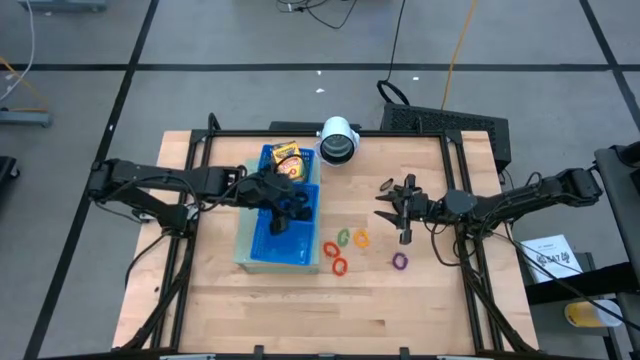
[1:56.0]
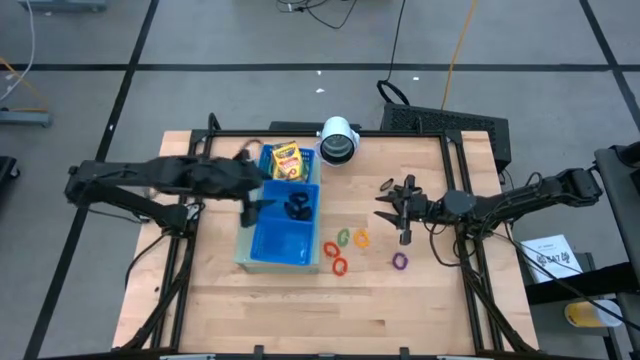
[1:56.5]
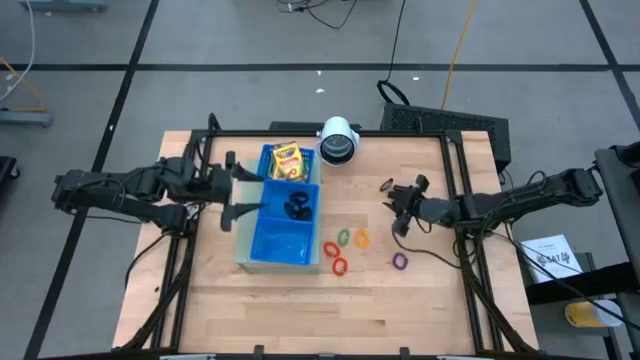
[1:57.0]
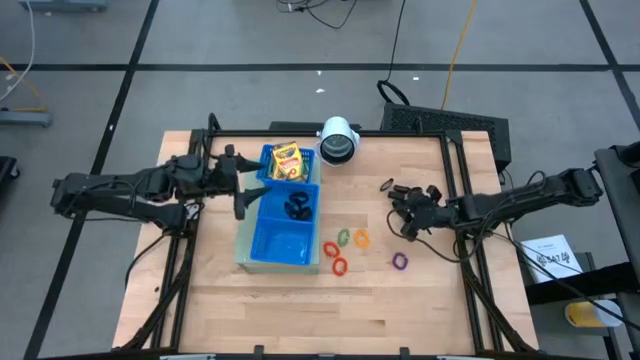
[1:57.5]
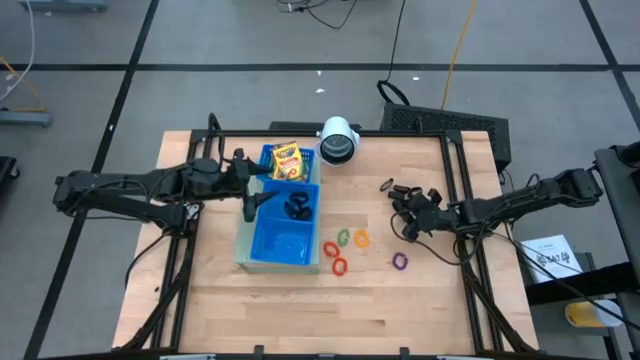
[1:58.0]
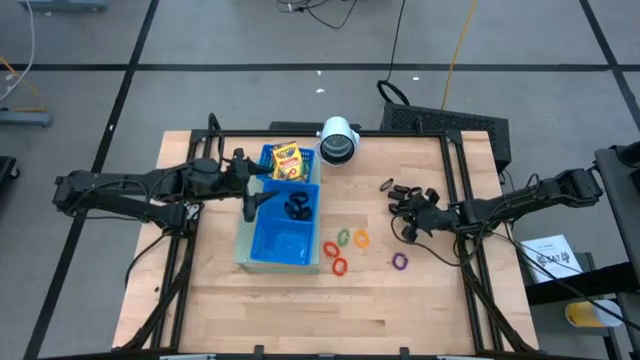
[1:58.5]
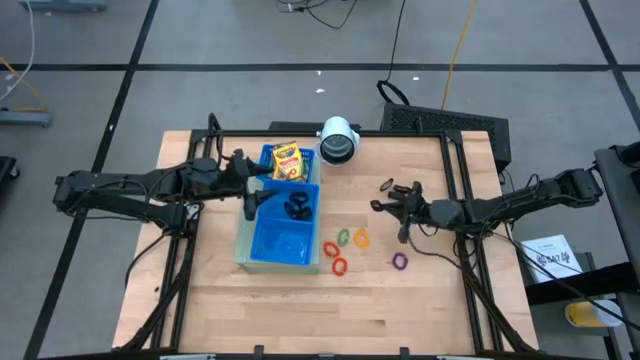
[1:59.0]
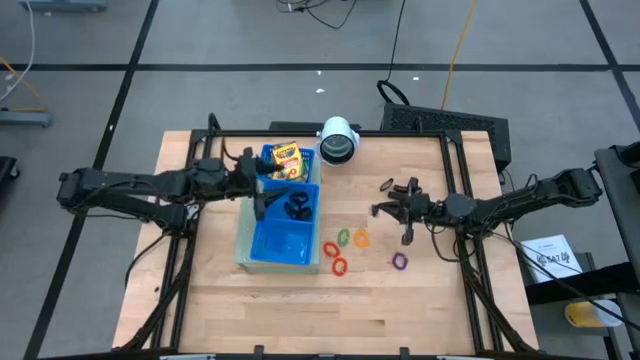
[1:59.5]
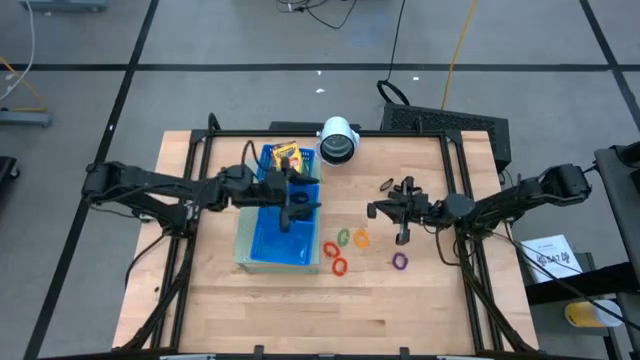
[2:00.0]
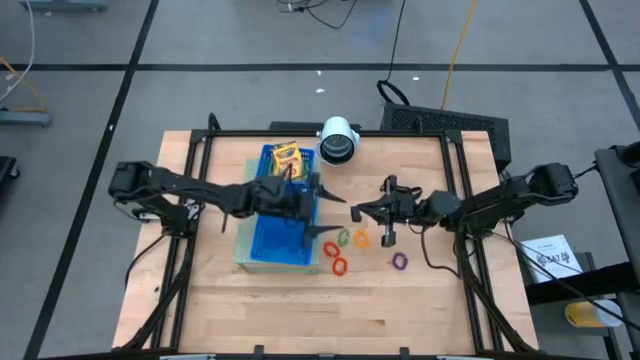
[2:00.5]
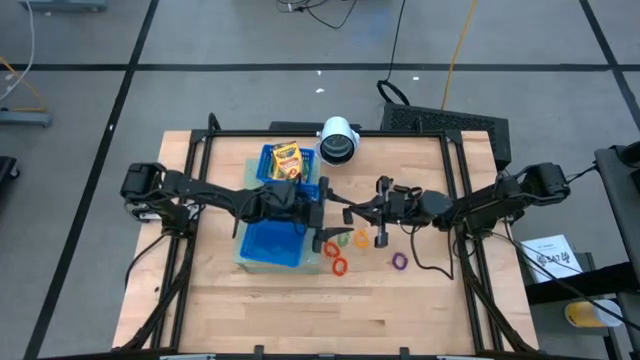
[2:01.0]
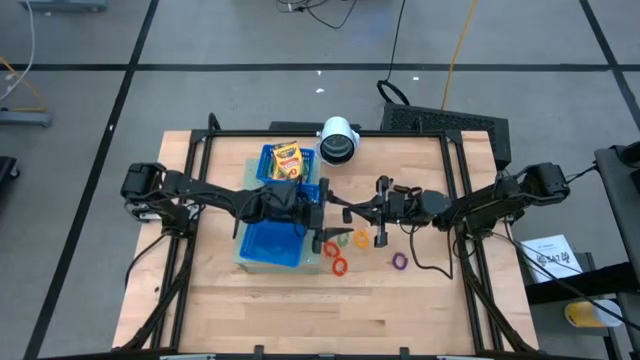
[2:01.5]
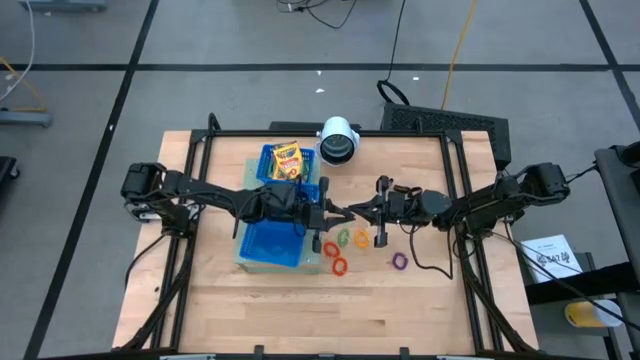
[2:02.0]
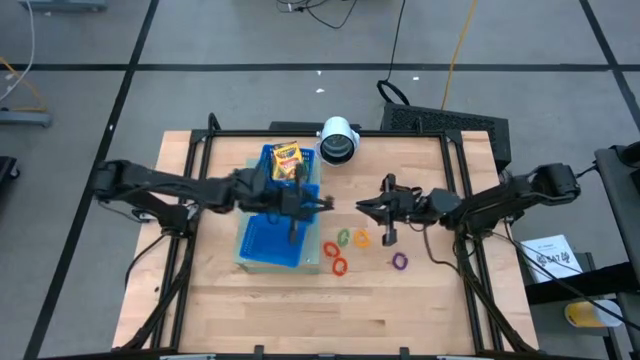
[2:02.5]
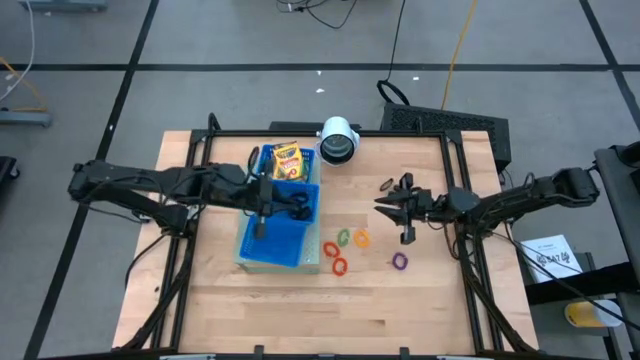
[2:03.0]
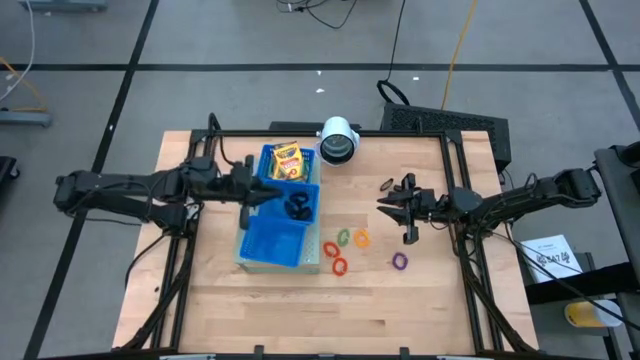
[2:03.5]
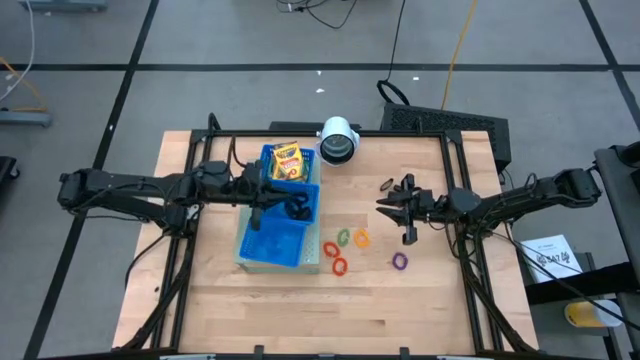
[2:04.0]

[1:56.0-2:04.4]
Task: Pick & Place Office Desk Supplies
Put the black rubber band into the middle blue bin on the shelf

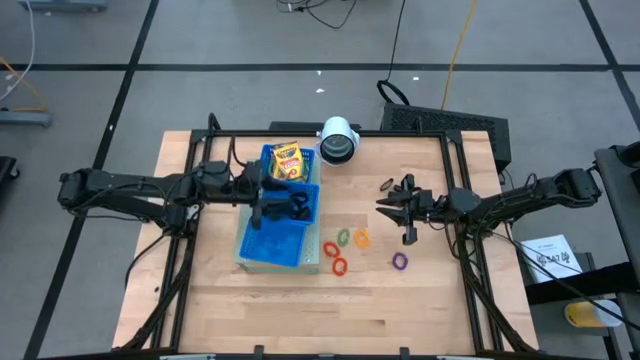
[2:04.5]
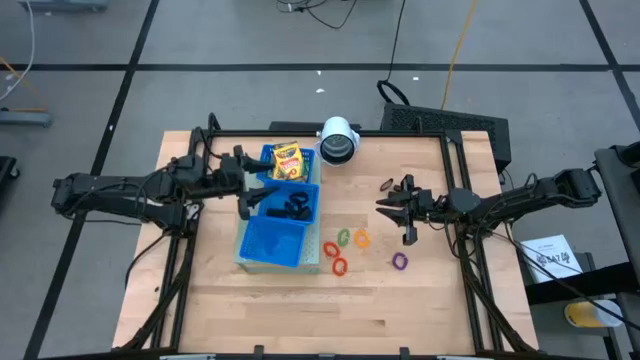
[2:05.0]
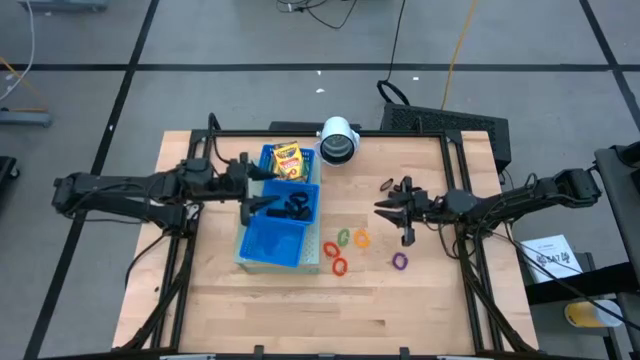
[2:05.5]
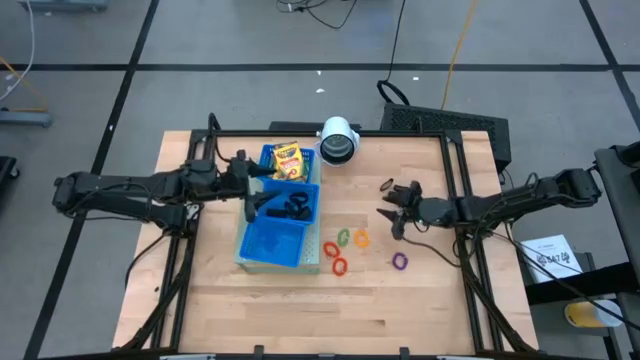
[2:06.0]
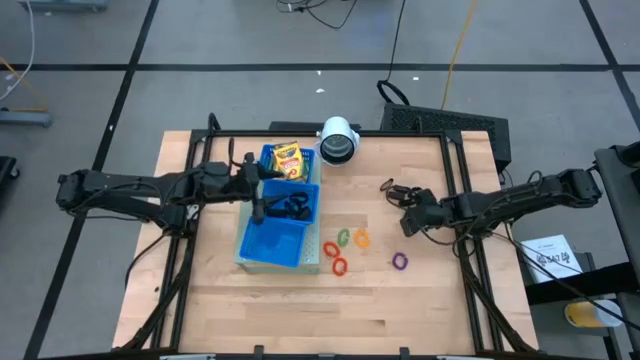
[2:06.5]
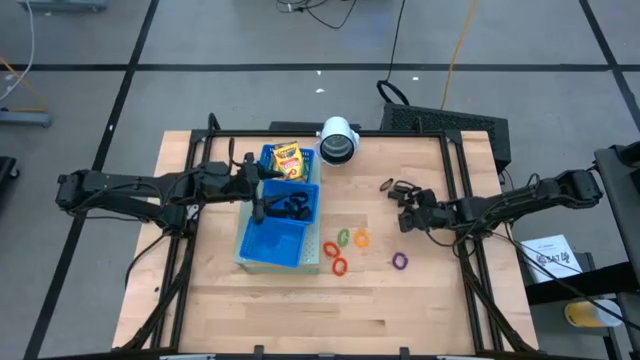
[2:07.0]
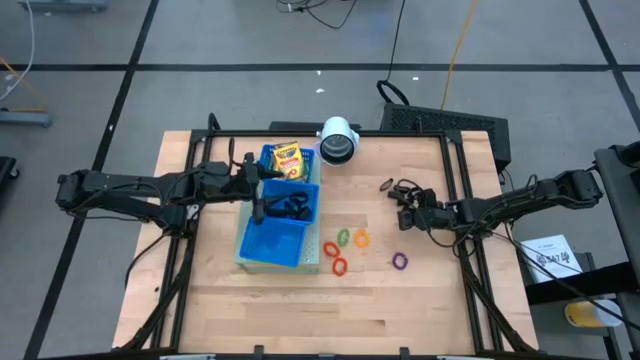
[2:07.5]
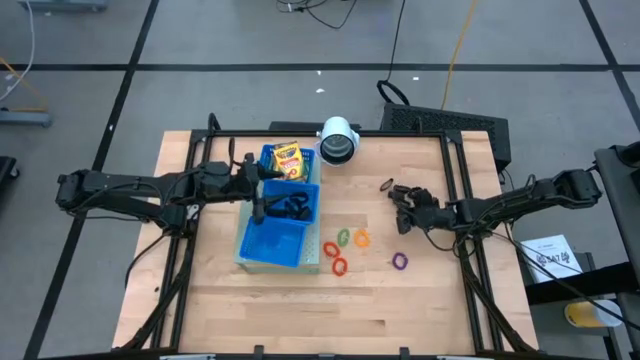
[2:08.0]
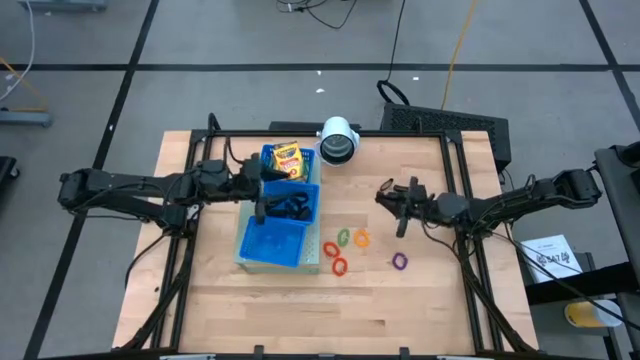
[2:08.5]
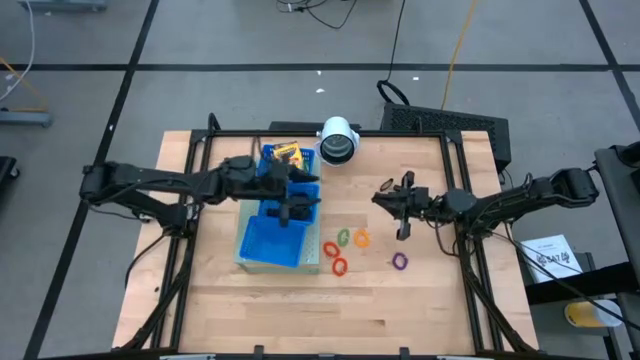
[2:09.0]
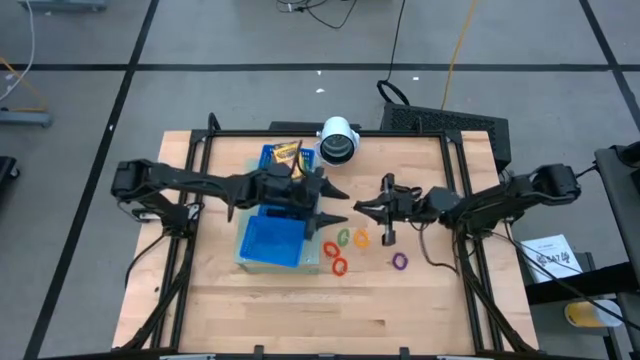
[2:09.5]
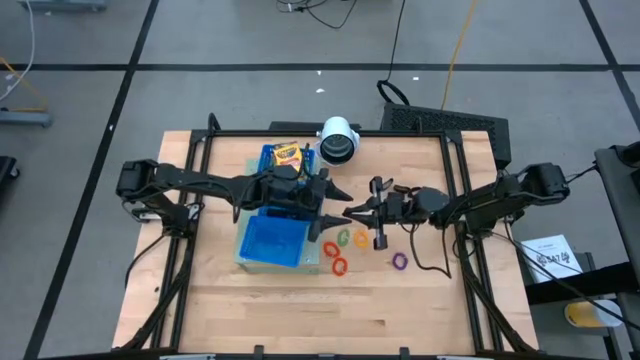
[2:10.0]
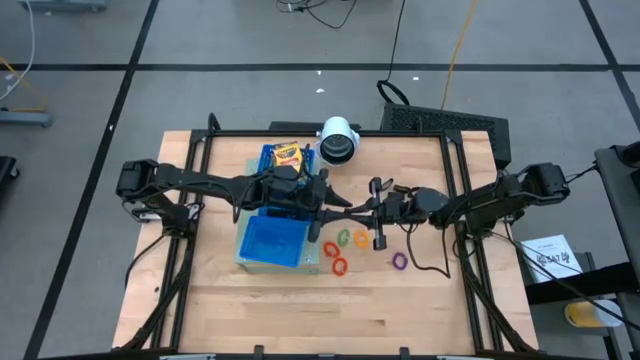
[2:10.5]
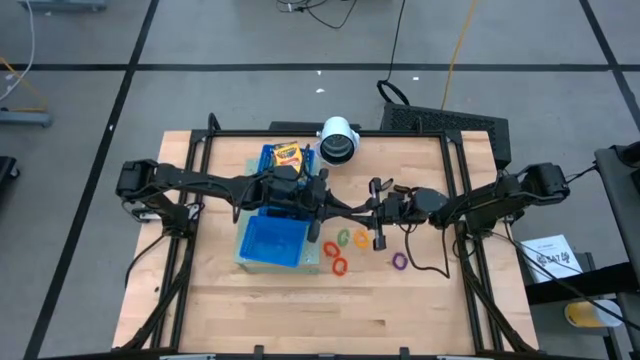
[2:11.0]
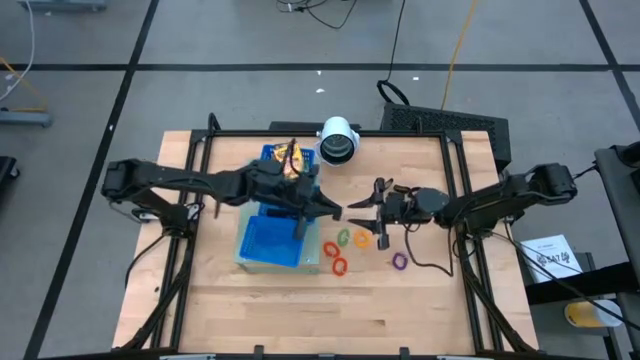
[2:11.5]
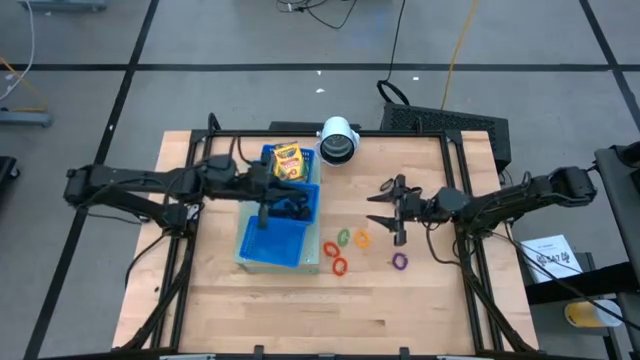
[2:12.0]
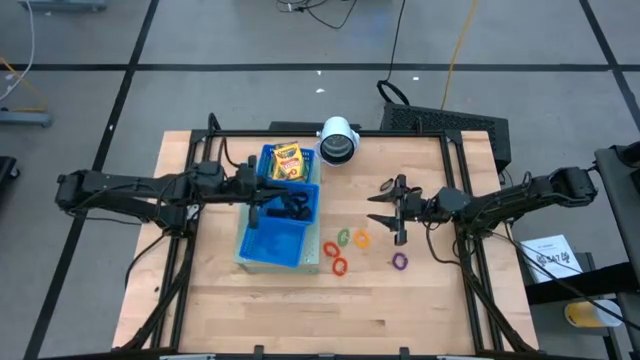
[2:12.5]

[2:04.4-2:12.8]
Put the black rubber band into the middle blue bin on the shelf

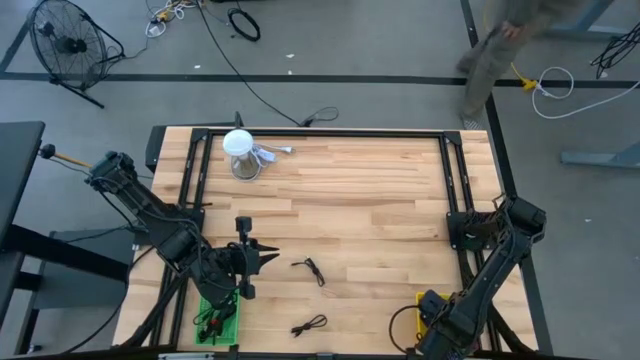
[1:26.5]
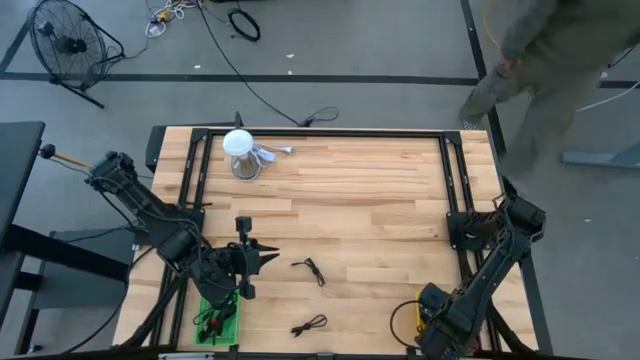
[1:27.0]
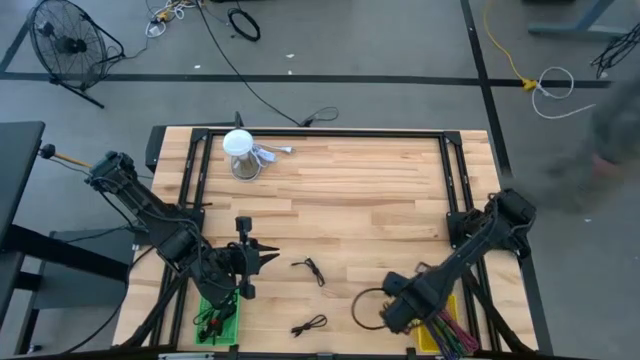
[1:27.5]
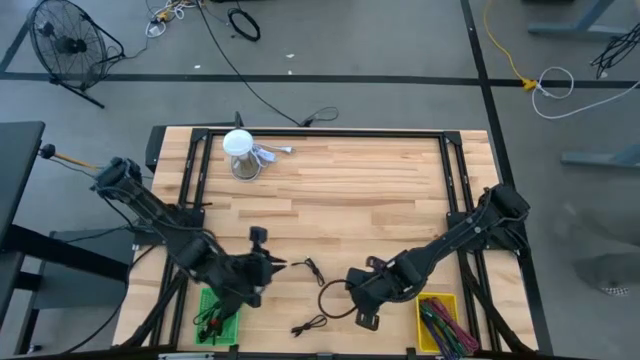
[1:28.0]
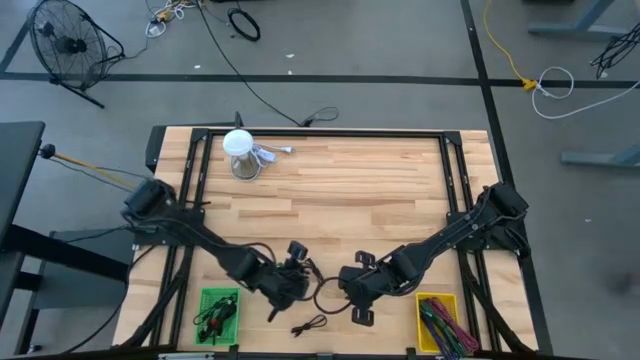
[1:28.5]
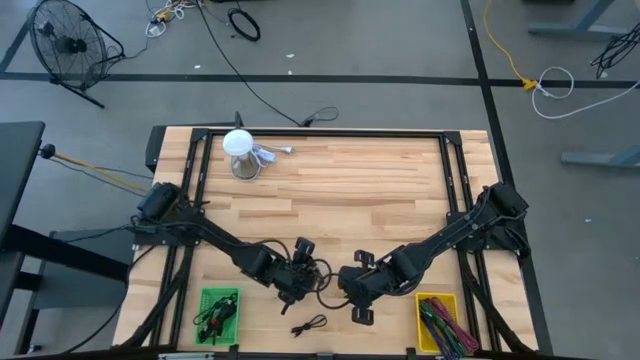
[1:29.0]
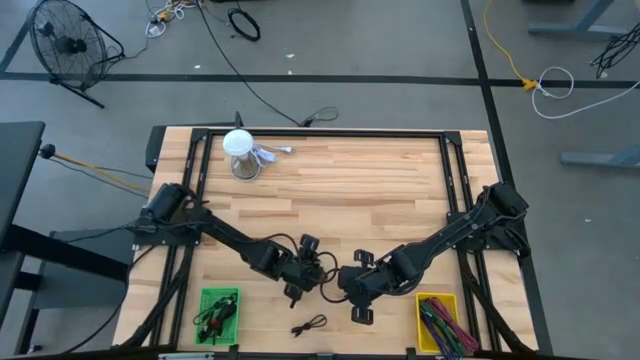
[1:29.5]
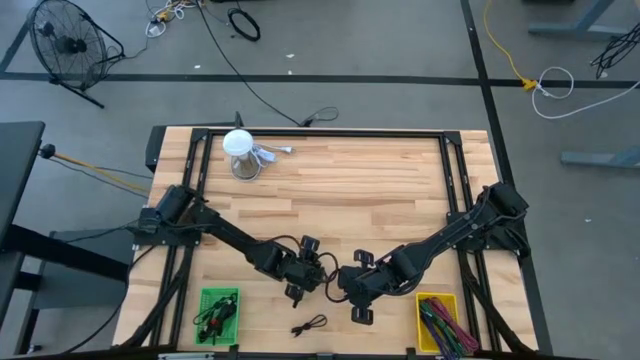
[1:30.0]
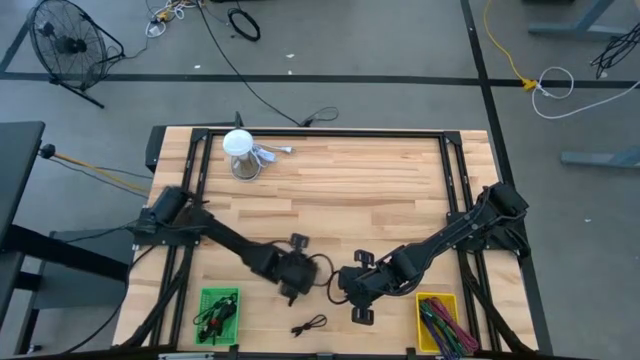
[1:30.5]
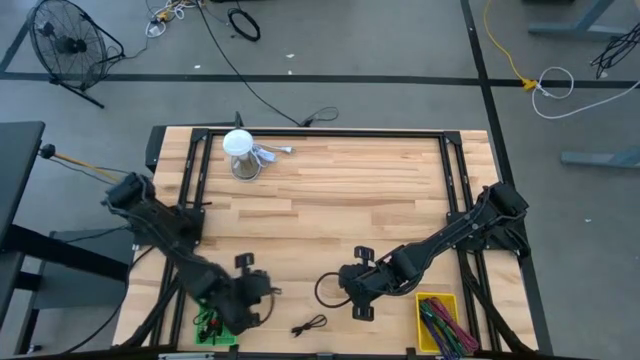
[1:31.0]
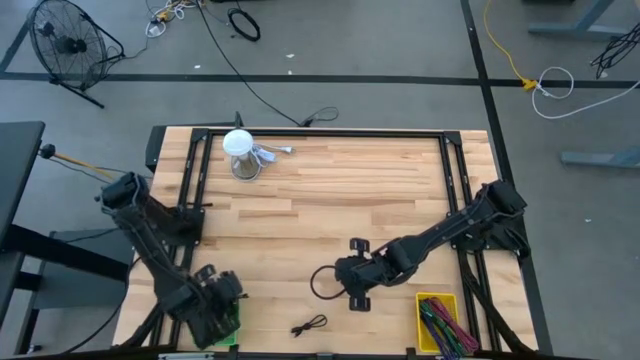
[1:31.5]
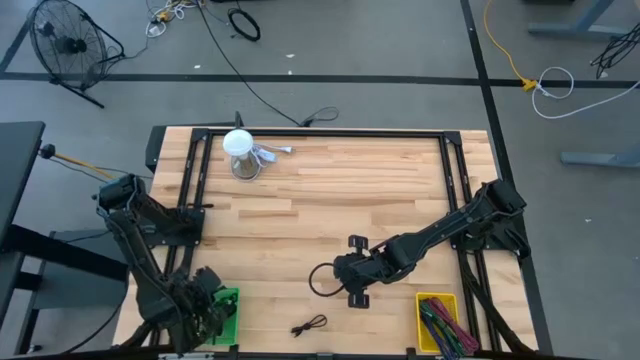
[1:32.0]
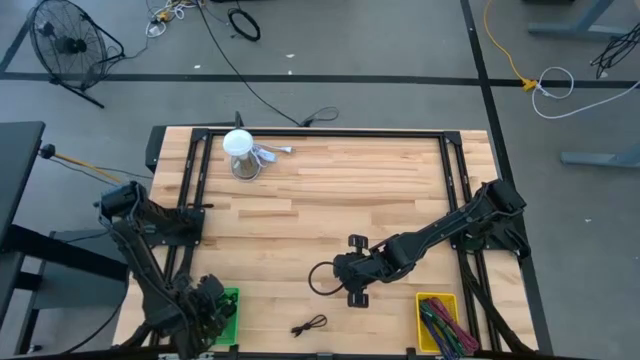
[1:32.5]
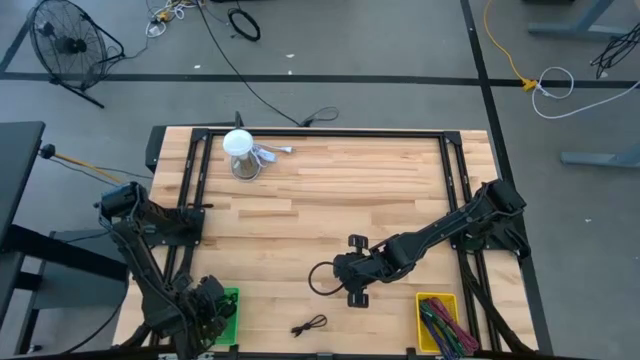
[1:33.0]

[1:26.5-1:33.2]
Task: Pick & Place USB Port
Put the black charger cable into the green bin
